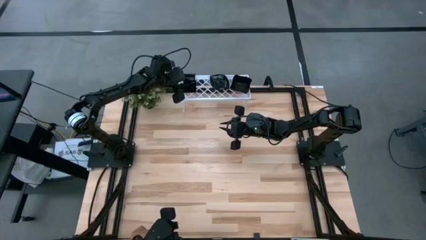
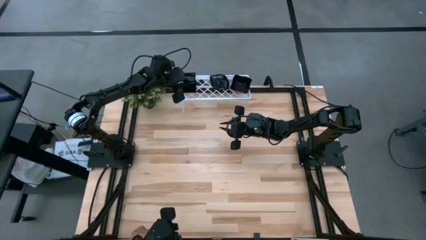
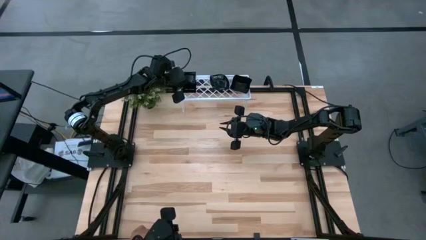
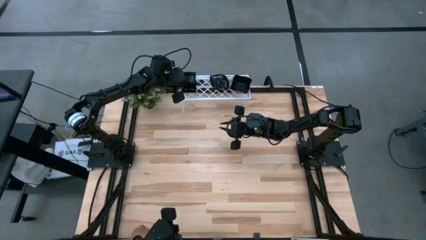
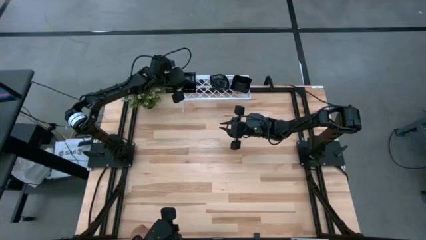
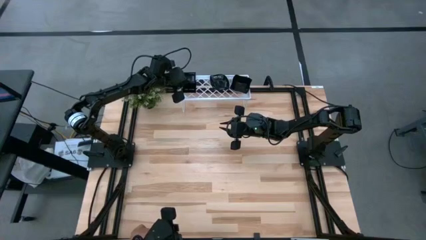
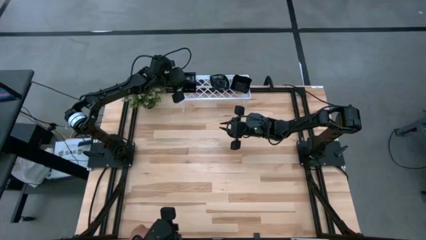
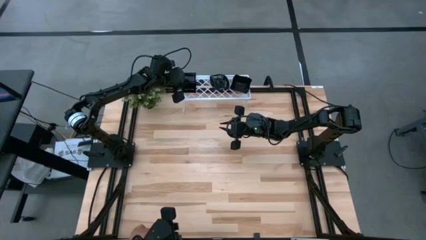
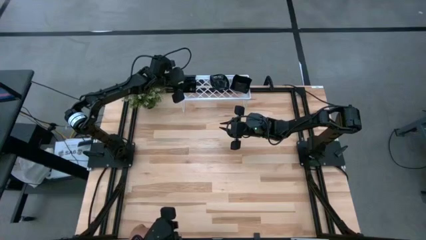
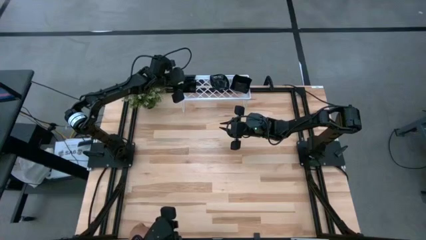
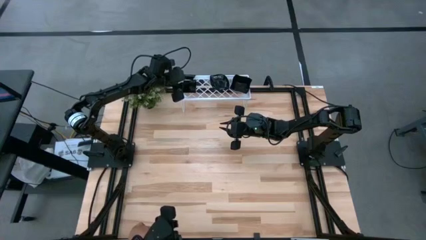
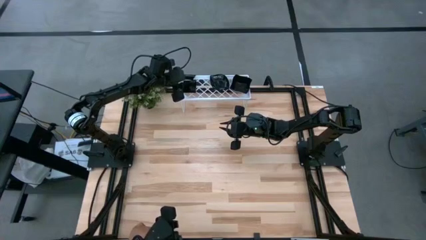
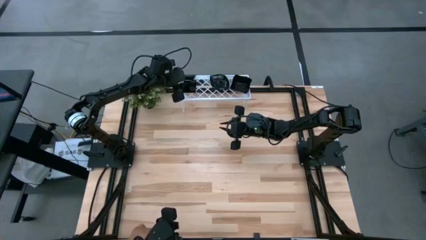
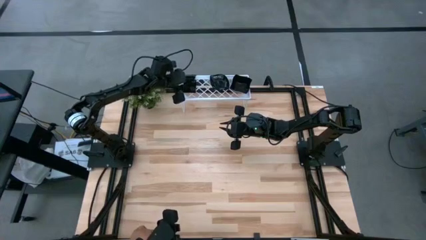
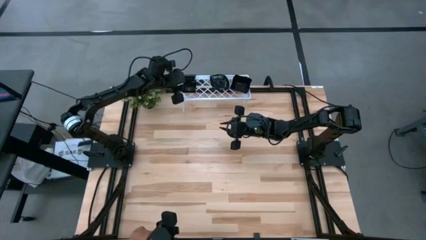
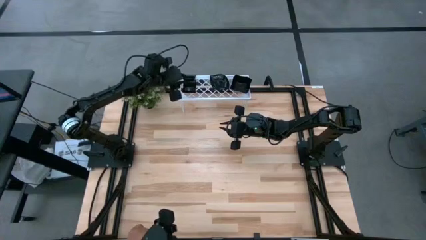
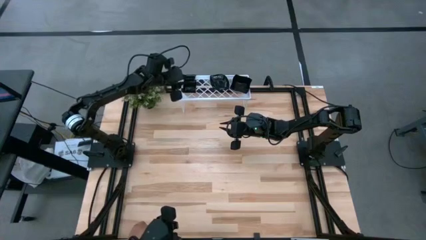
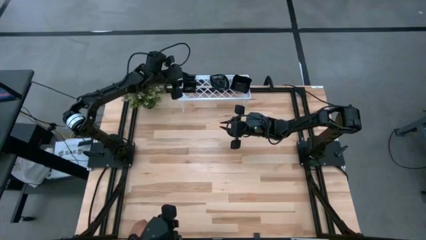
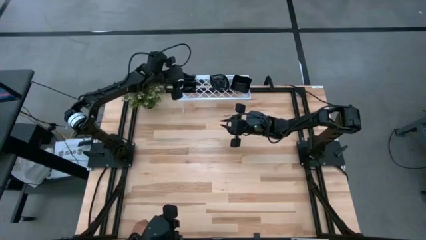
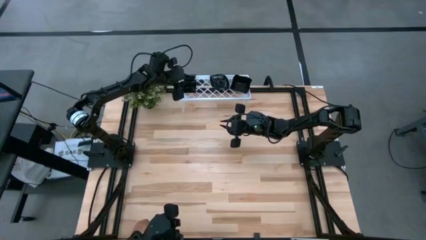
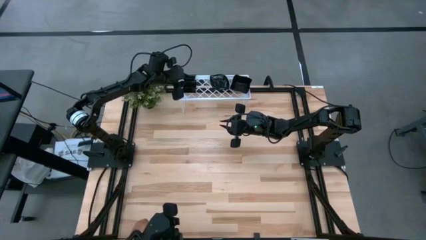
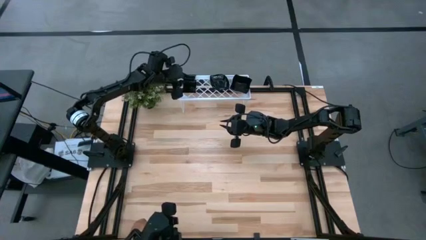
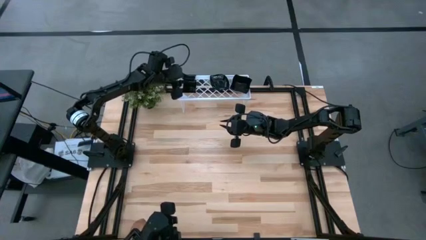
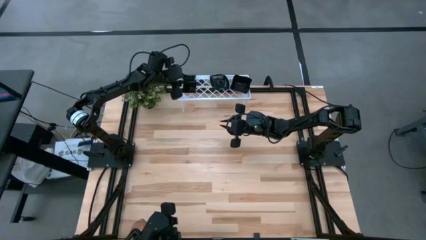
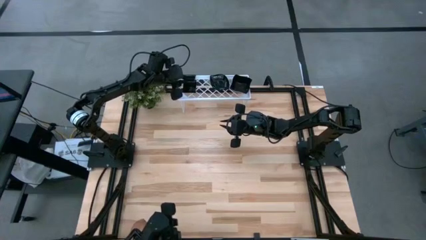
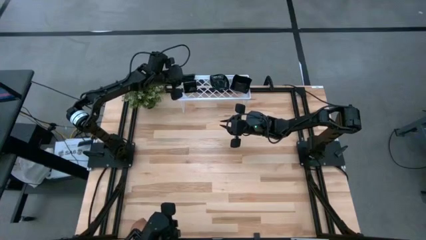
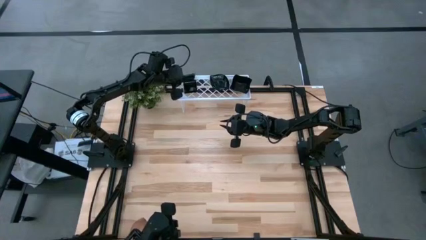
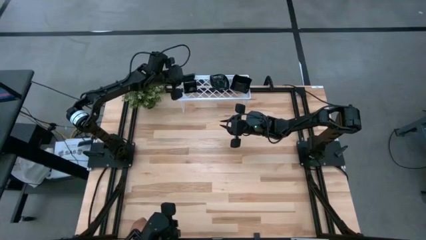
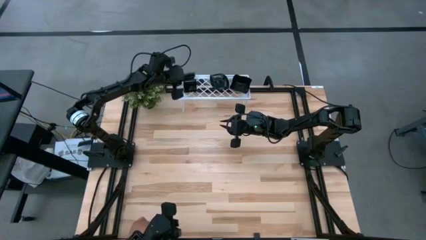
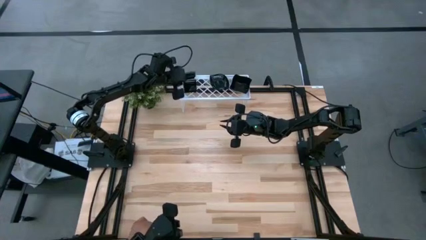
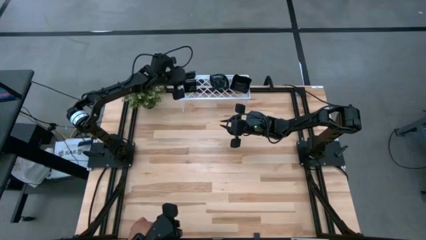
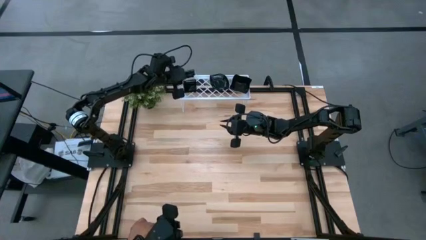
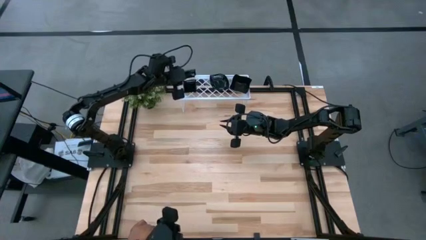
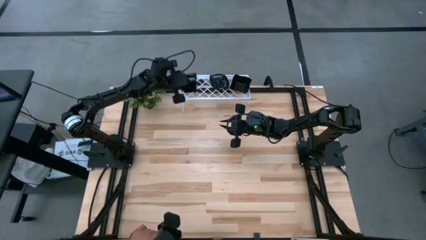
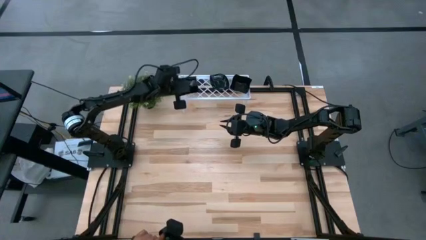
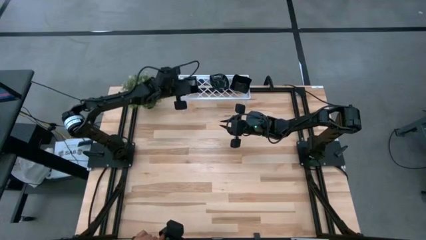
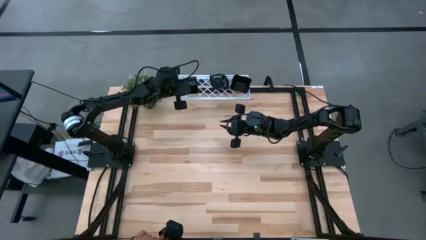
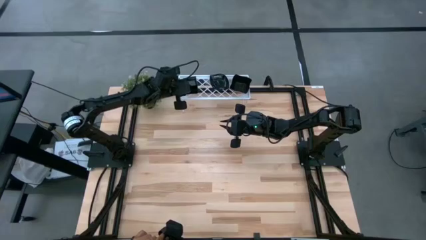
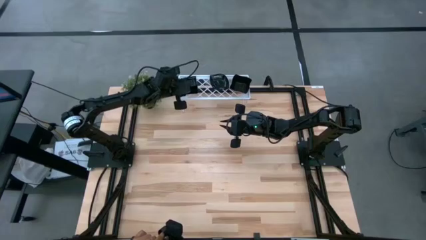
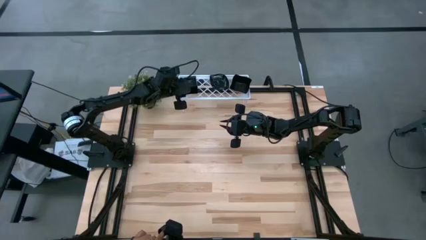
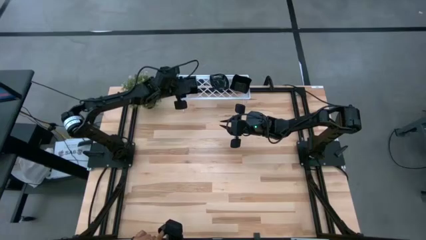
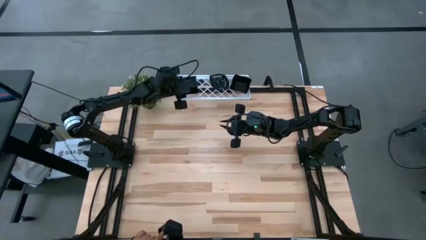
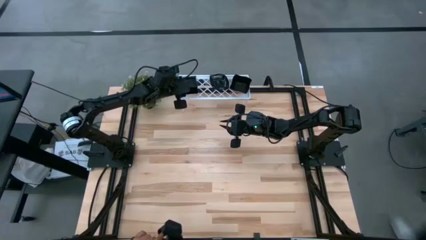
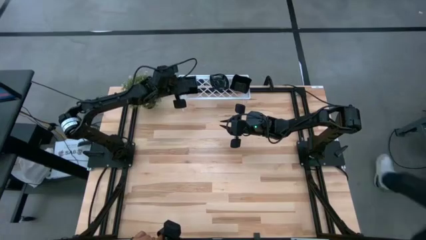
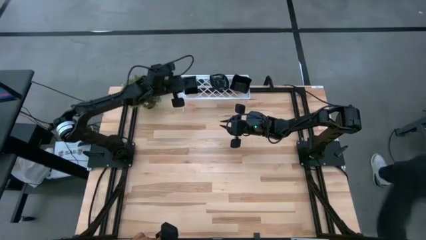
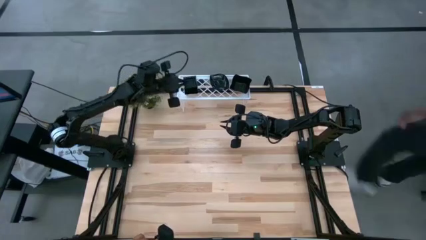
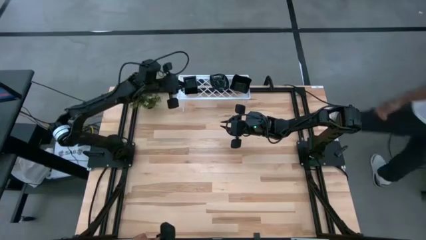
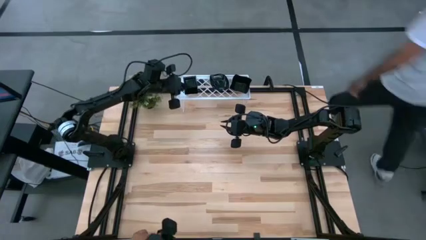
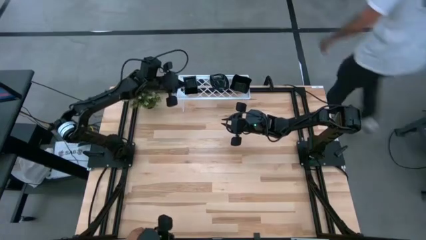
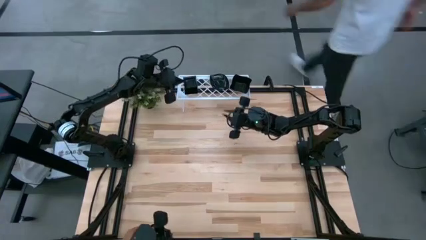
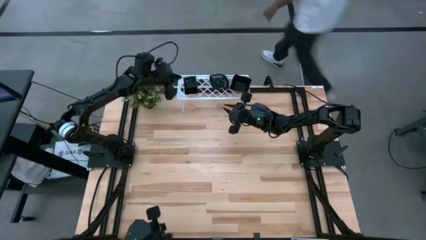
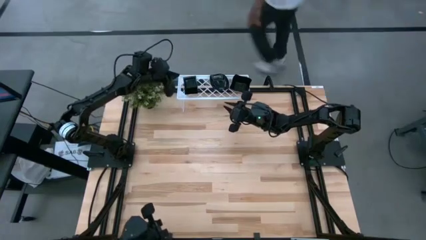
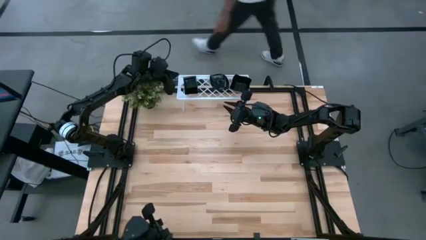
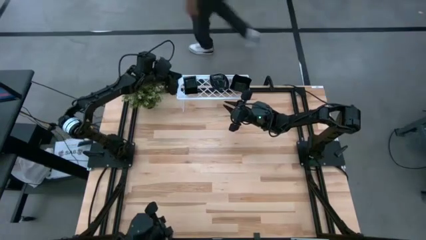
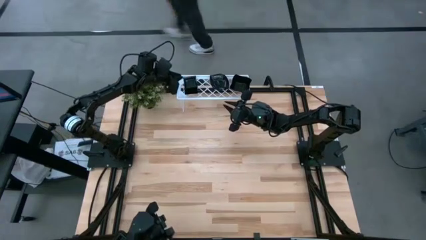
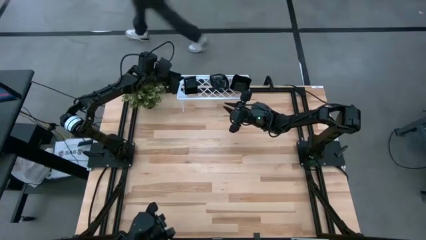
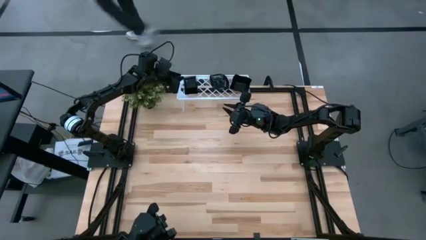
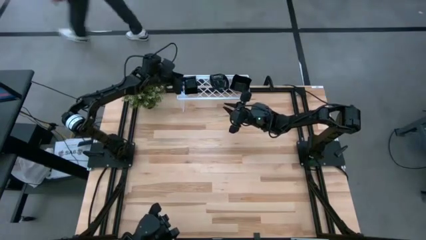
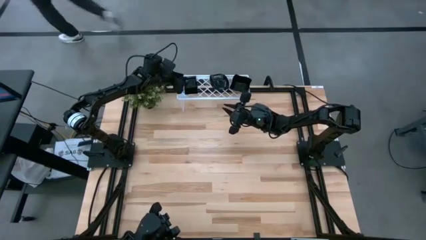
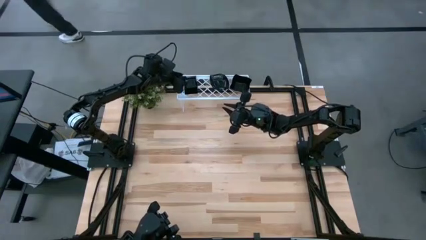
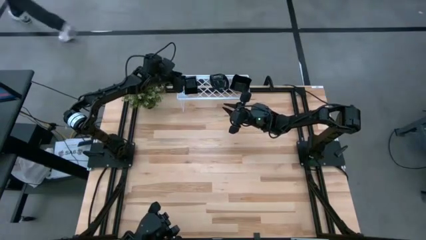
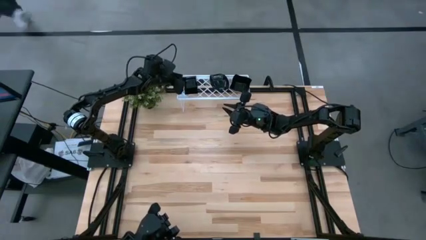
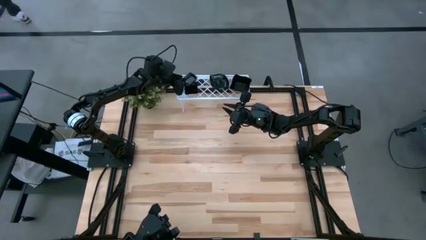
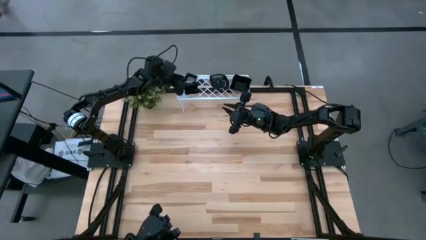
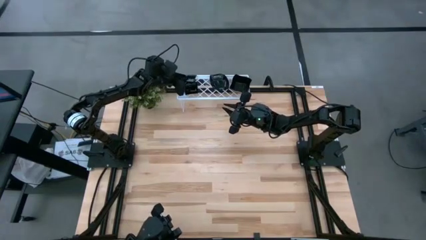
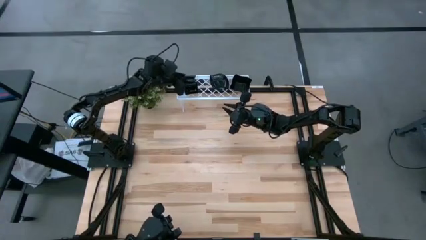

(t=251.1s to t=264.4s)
Task: Pick & Place Mini shaped plates
Stack the black square plate on top of the black square plate on the shelf
